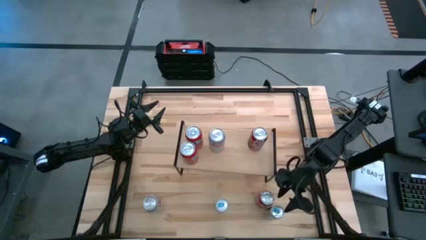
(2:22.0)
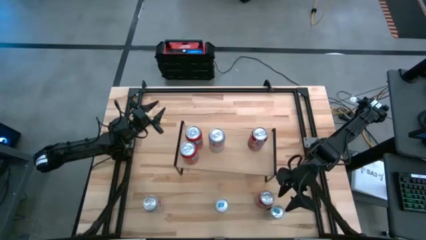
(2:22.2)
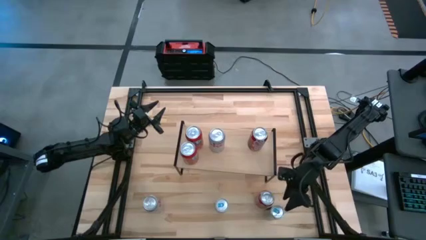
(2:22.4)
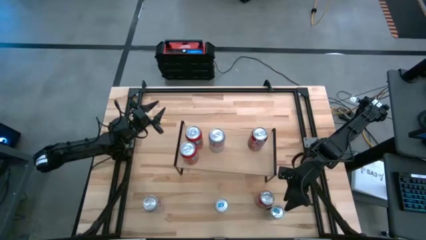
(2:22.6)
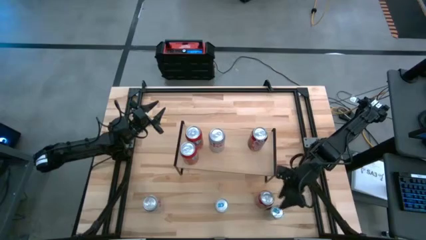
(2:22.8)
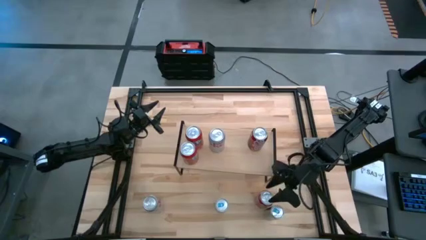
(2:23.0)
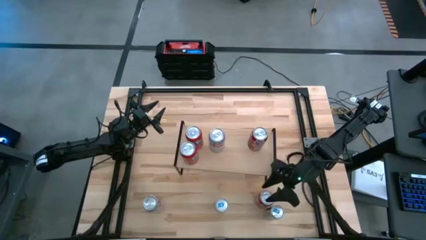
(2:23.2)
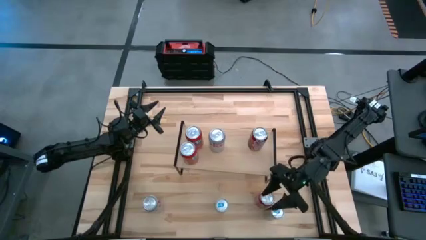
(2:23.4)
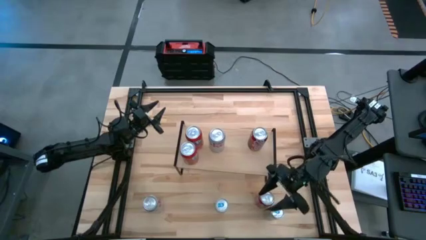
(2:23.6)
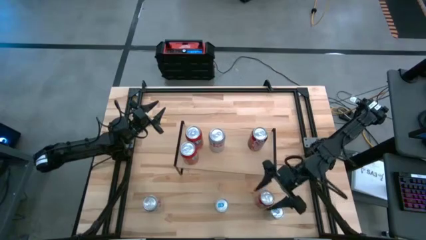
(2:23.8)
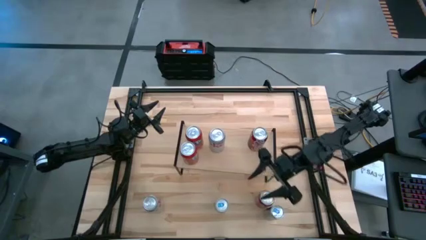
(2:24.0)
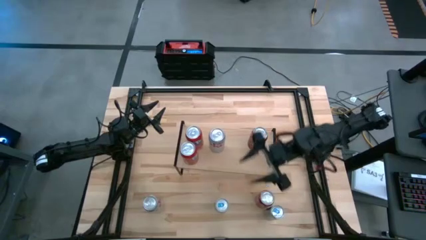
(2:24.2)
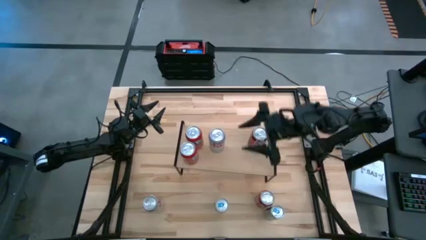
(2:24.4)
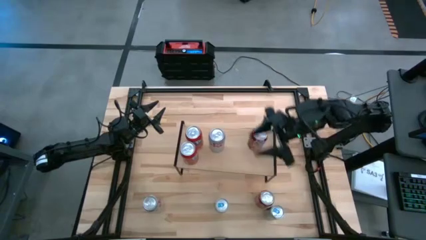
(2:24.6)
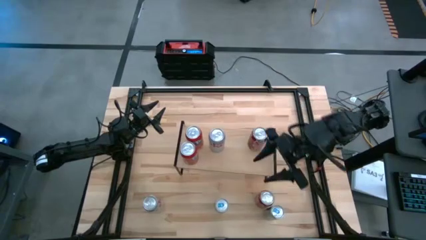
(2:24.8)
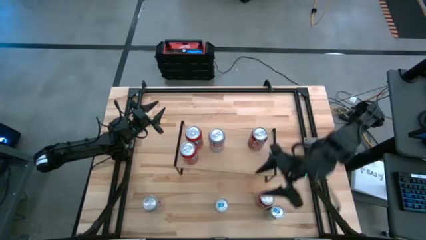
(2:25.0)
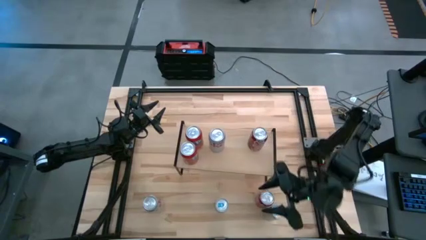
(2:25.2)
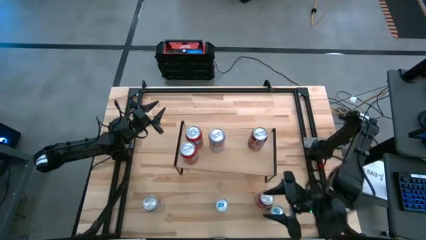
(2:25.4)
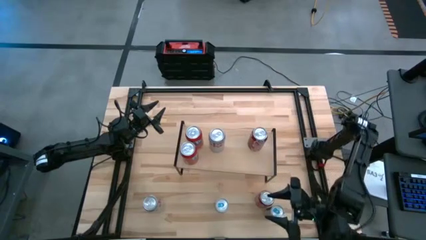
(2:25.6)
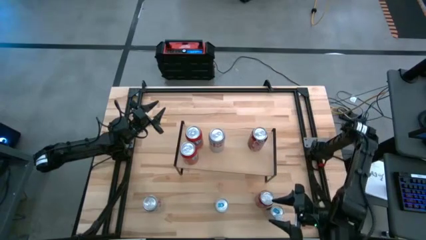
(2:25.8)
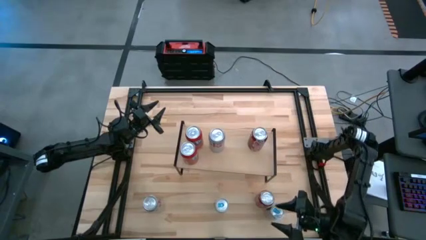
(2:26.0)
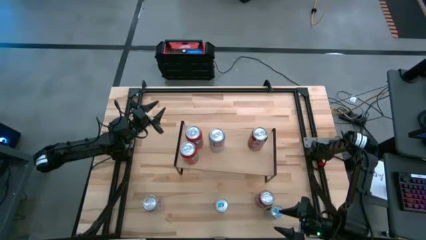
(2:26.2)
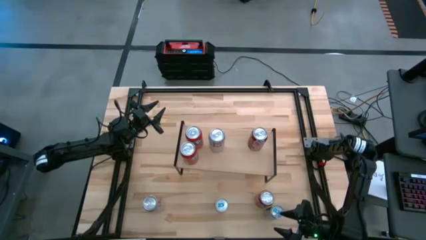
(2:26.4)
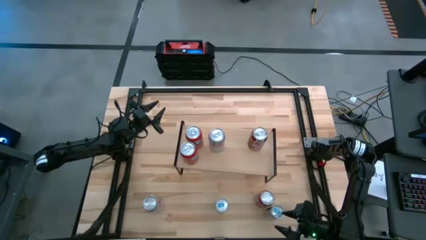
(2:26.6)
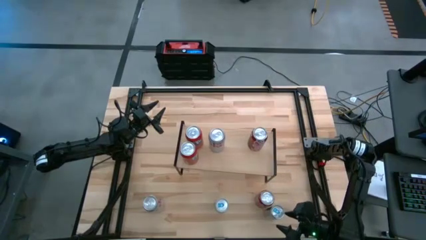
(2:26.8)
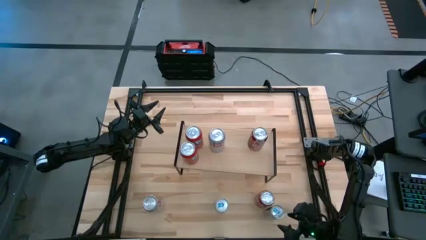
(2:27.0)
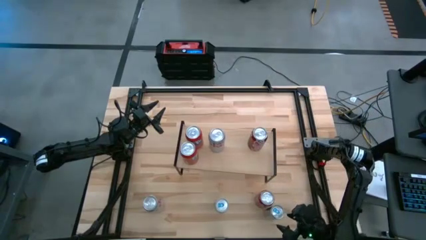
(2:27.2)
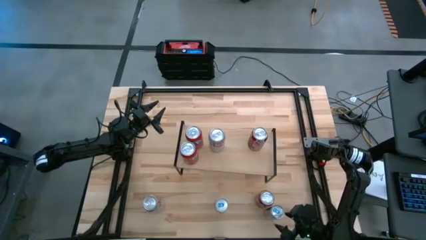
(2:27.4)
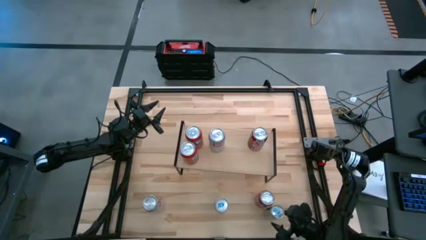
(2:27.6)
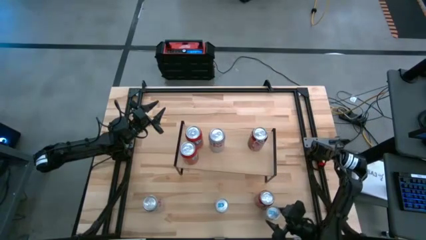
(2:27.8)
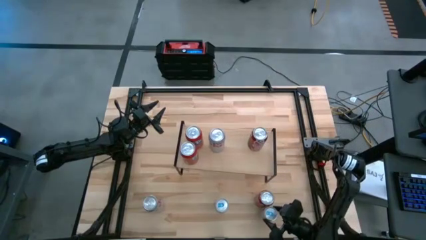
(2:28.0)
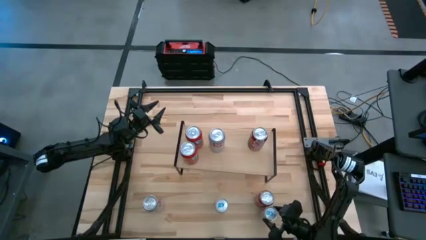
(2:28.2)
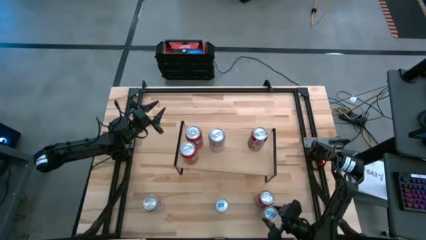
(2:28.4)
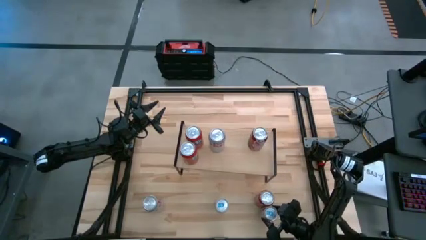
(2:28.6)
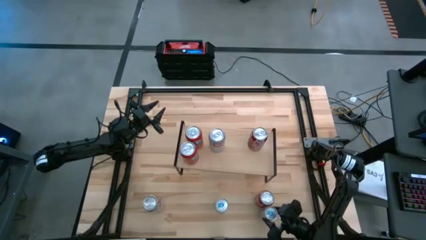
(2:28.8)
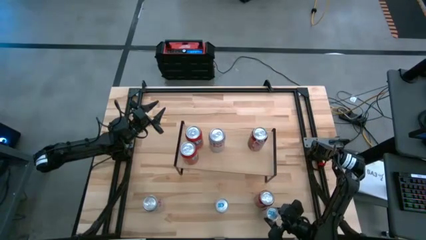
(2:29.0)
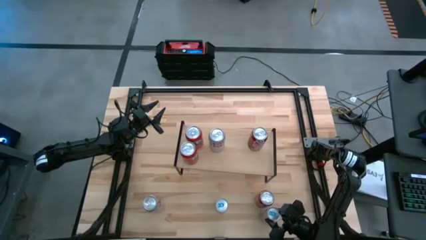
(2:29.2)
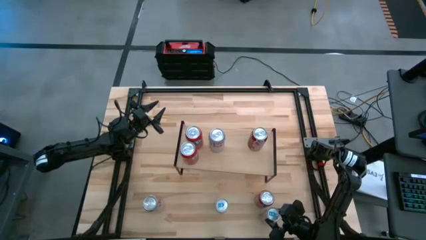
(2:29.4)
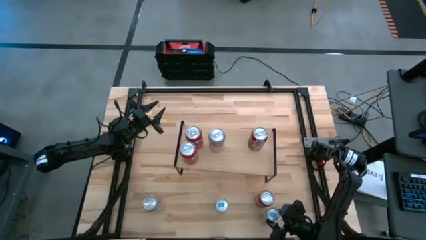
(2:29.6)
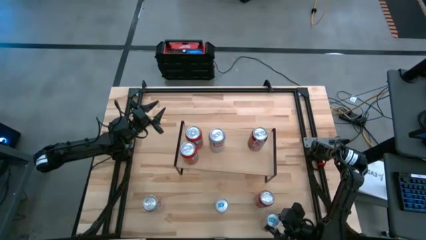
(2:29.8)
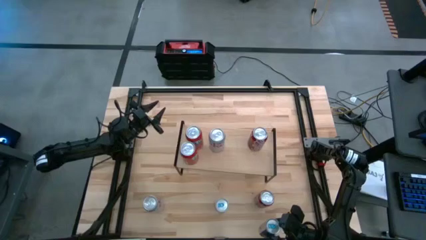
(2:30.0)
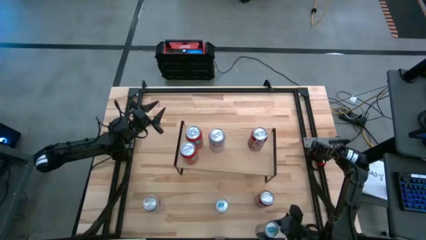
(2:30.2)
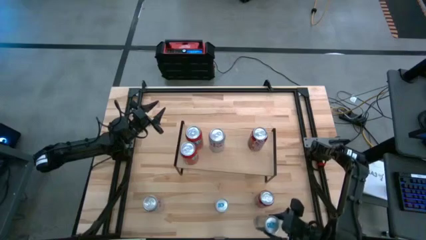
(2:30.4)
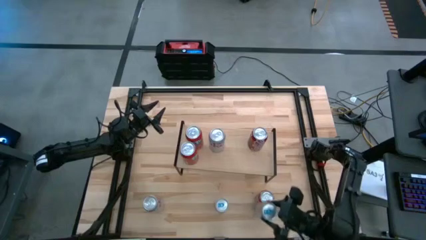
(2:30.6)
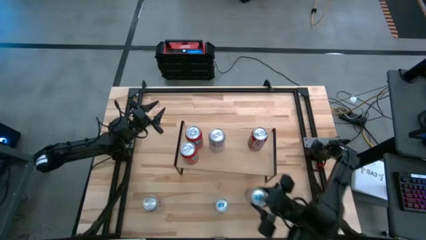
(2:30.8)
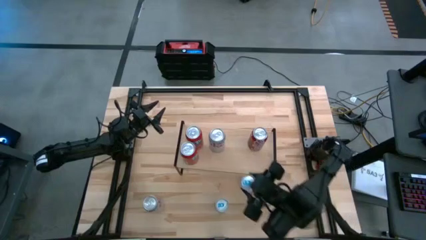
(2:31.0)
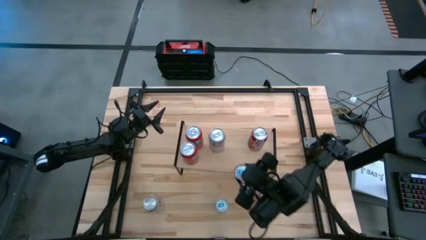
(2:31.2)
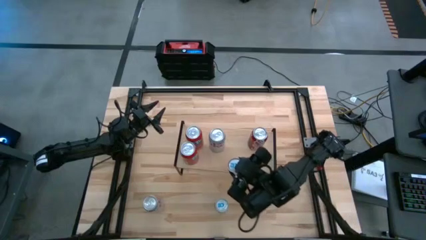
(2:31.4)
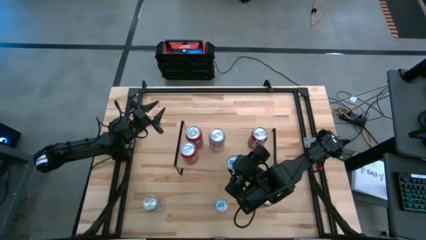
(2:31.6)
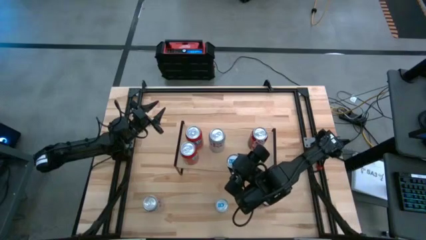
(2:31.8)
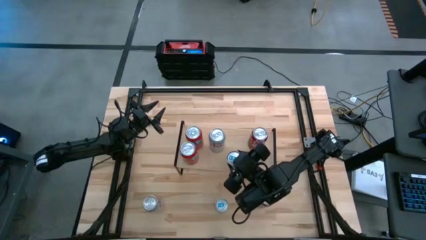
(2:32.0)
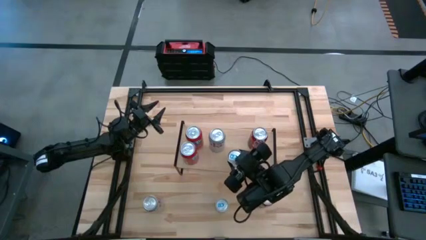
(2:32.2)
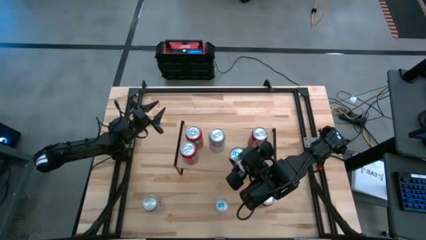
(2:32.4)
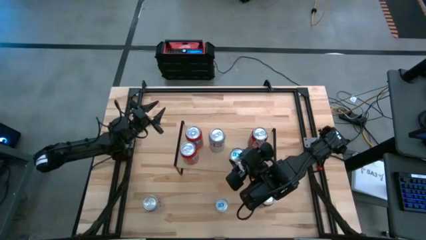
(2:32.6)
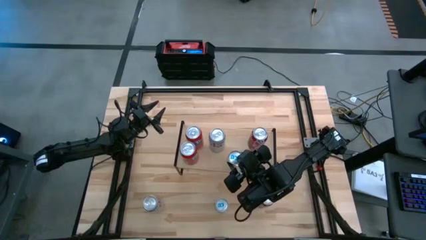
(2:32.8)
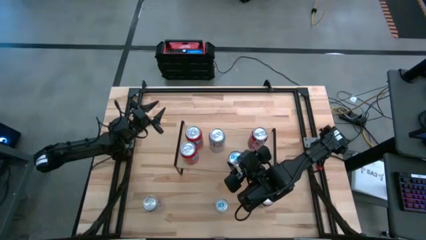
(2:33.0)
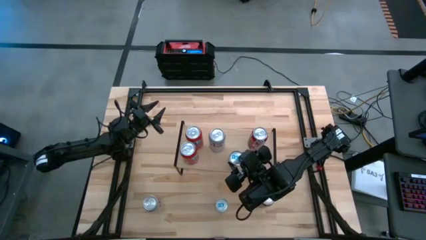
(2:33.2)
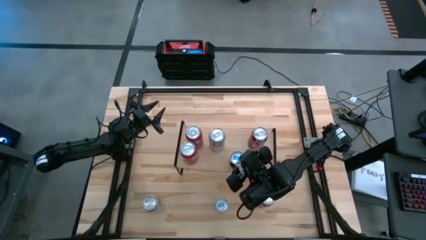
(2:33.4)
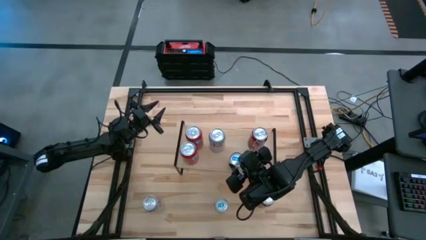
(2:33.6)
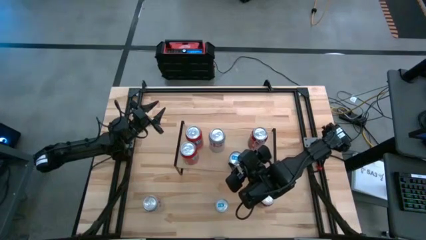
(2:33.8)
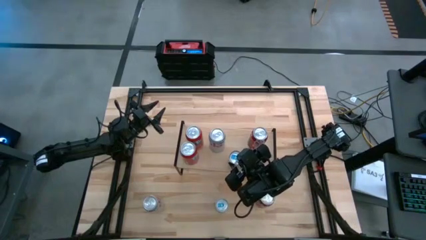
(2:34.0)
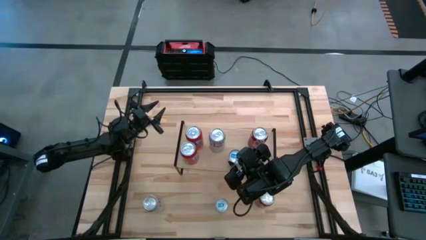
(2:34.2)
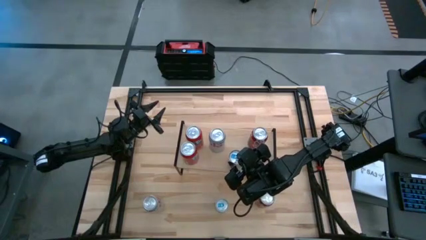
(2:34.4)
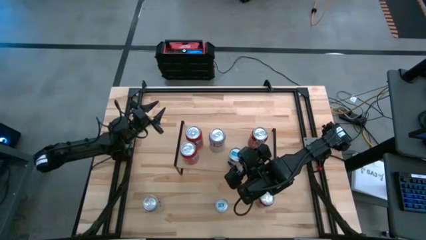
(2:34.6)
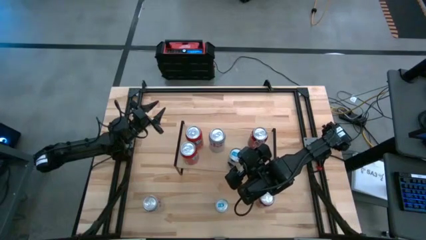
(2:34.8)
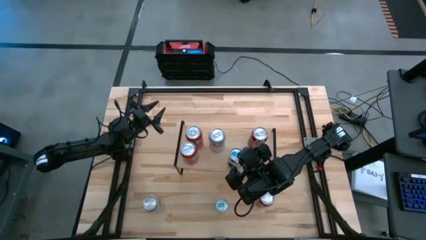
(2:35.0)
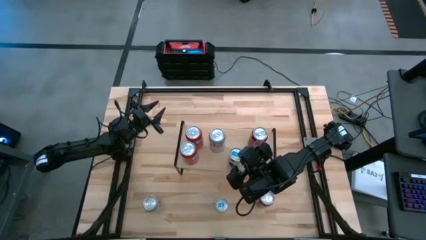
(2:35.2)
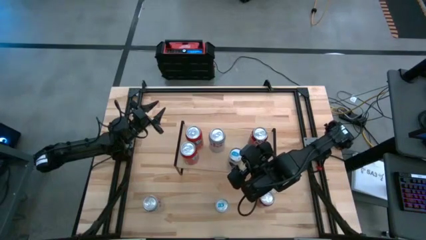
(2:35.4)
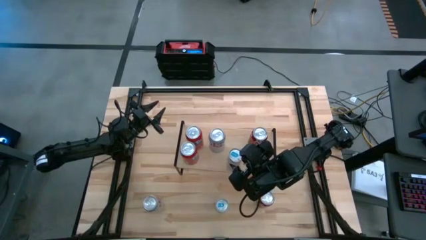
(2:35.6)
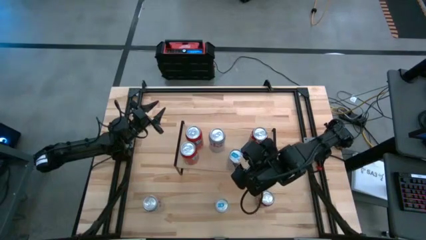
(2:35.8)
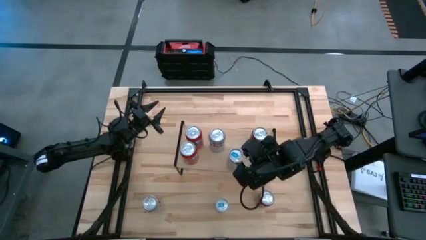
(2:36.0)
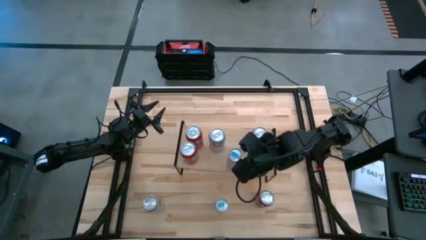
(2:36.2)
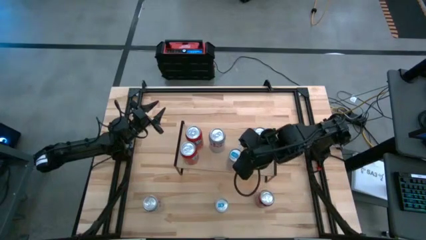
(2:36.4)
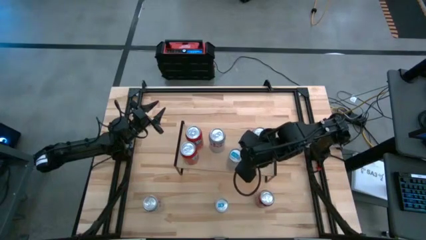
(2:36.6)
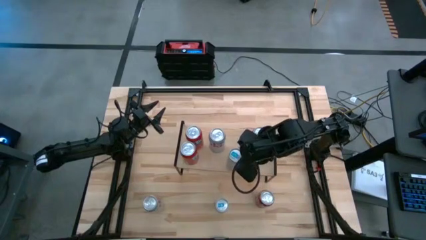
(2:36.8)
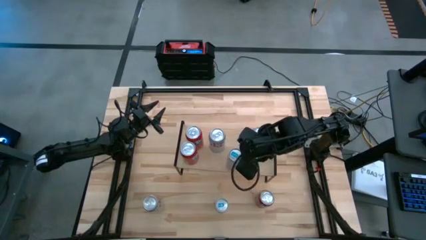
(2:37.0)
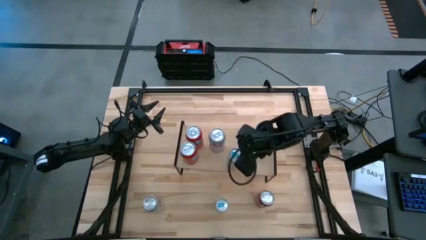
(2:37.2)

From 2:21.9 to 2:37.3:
Task: Place canned beverage on shelf
Put the right blue soda can on the shelf

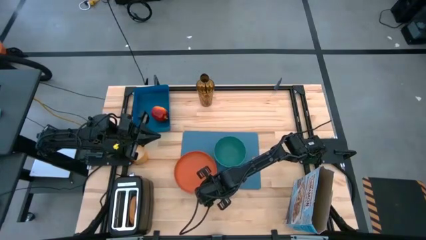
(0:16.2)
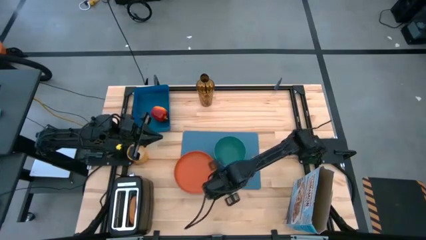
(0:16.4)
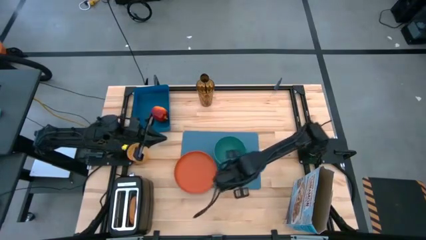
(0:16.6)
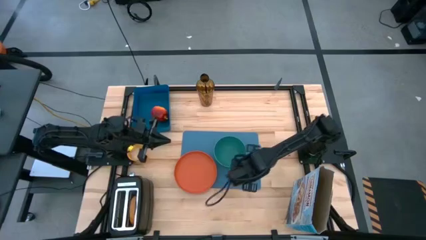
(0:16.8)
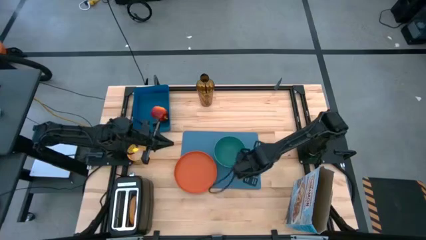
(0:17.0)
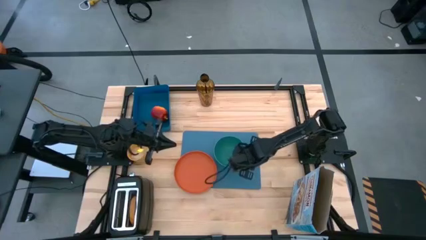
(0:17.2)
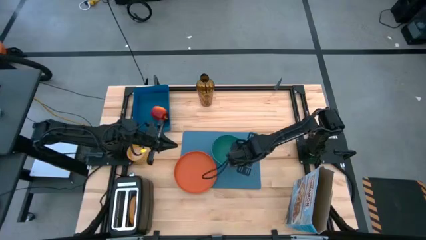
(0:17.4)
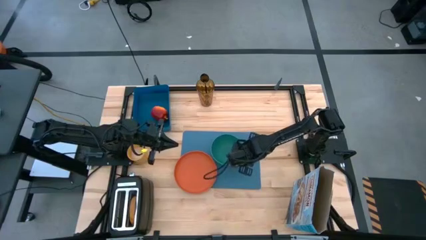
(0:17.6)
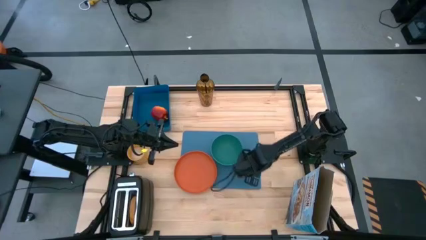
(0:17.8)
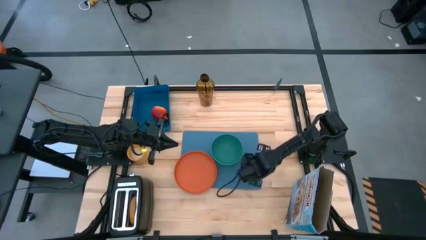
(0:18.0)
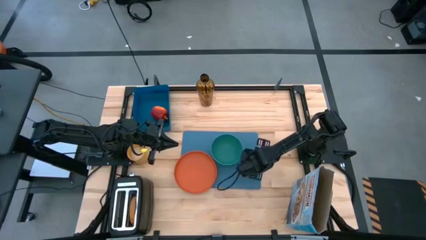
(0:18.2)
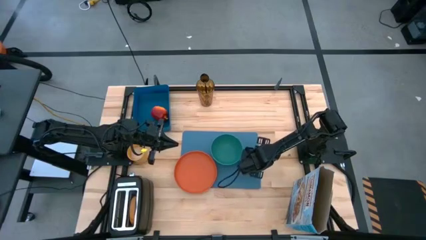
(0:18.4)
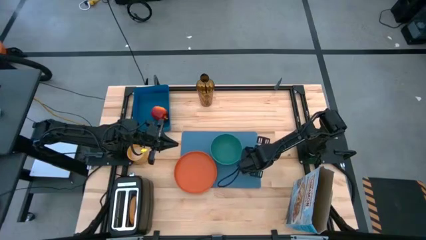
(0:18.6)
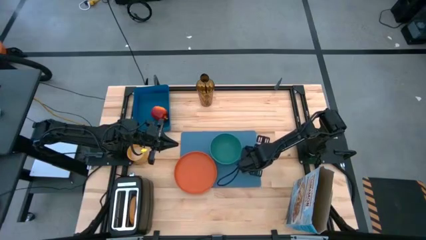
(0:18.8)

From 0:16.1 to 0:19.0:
Task: Arrange a breakfast setting
Adjust the green bowl and the blue cutting board on the table
